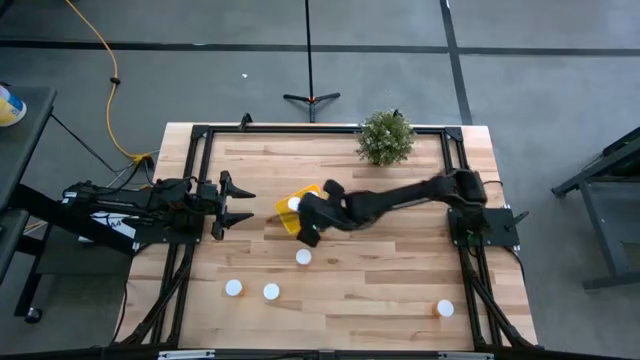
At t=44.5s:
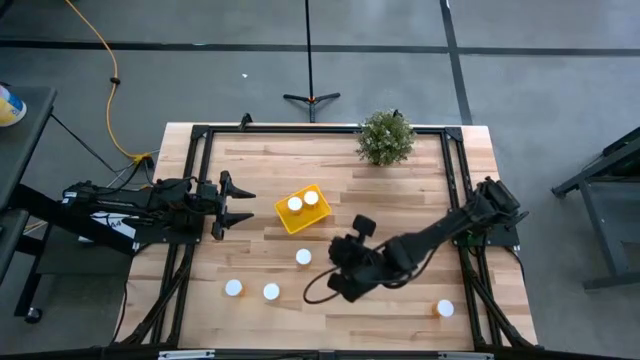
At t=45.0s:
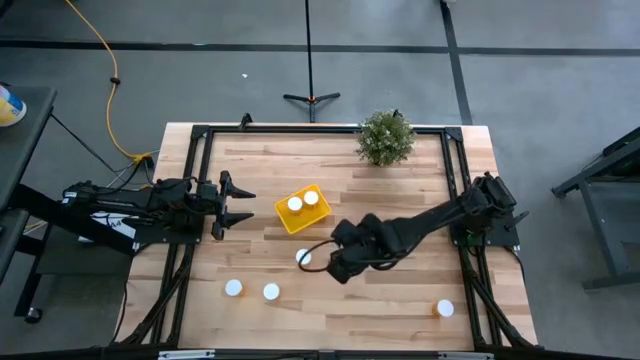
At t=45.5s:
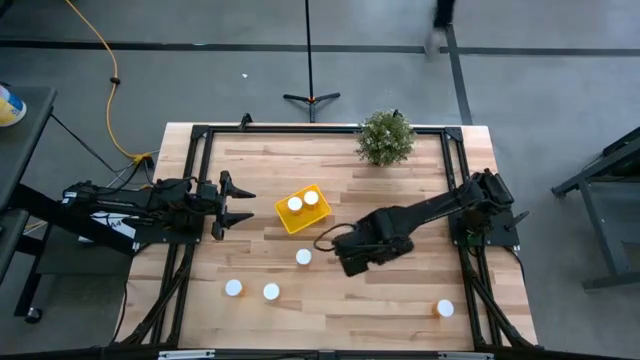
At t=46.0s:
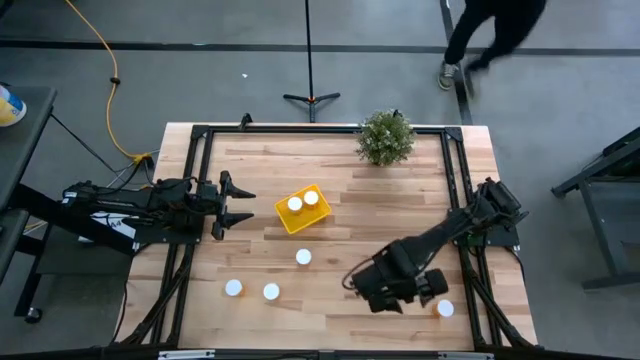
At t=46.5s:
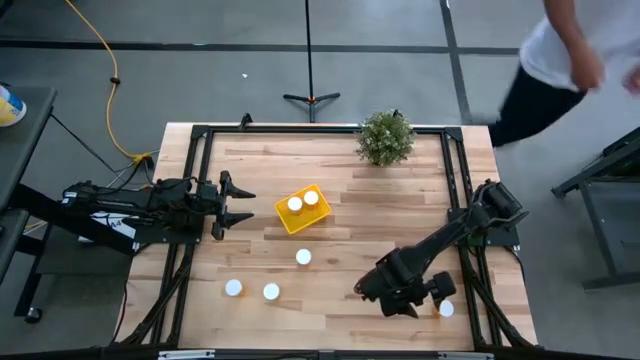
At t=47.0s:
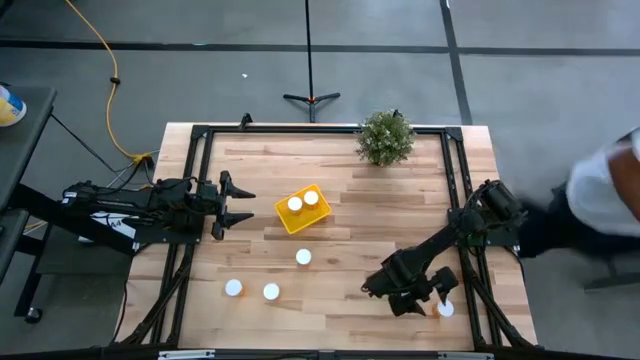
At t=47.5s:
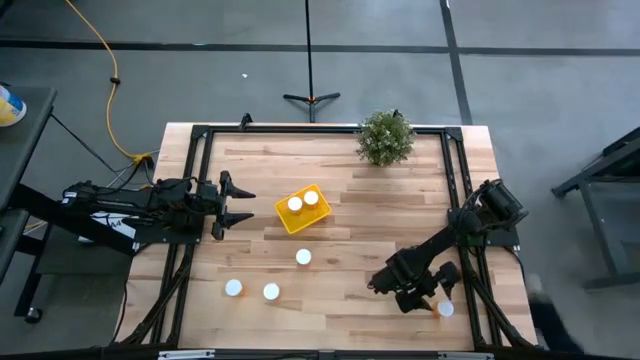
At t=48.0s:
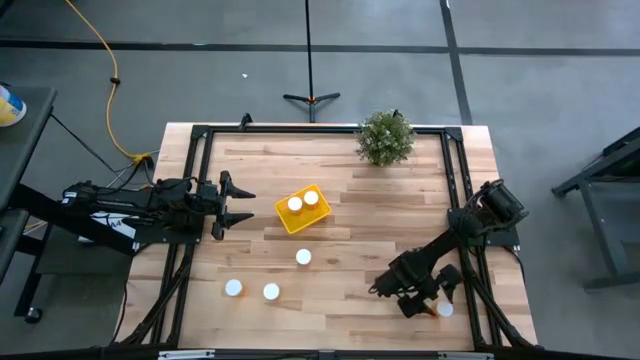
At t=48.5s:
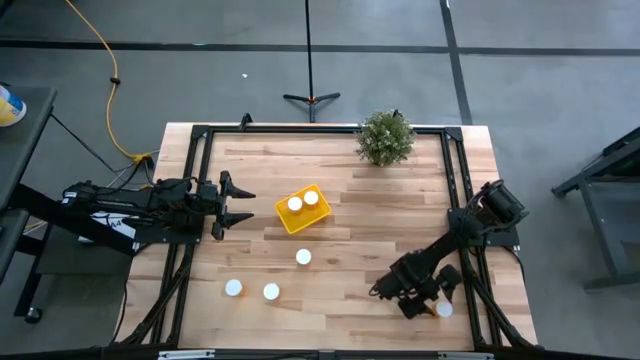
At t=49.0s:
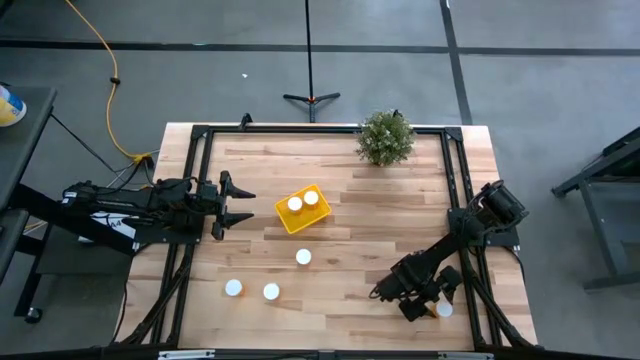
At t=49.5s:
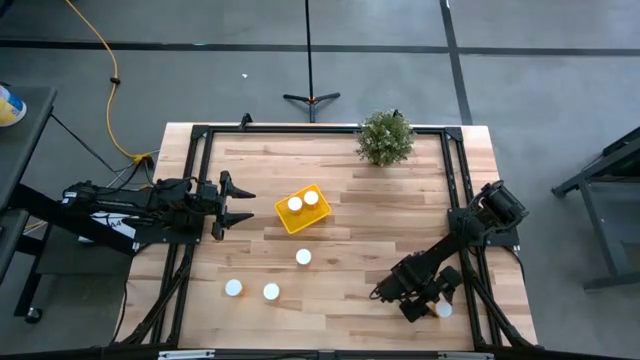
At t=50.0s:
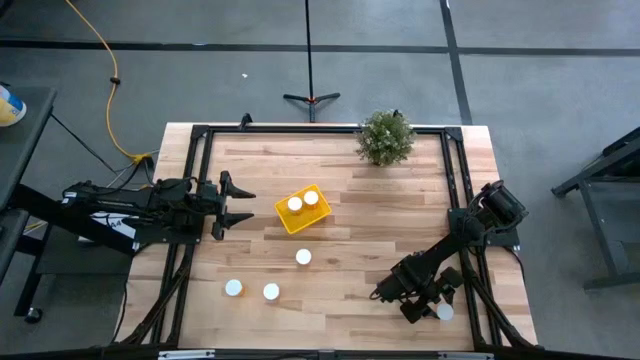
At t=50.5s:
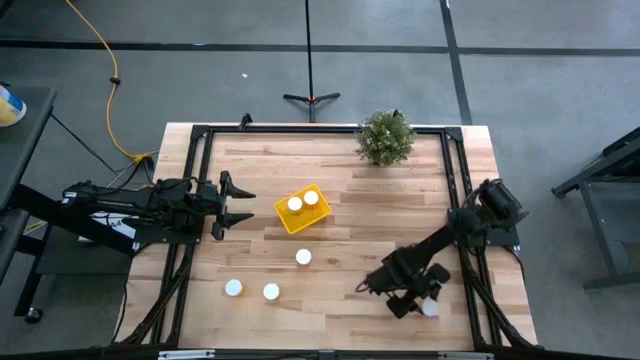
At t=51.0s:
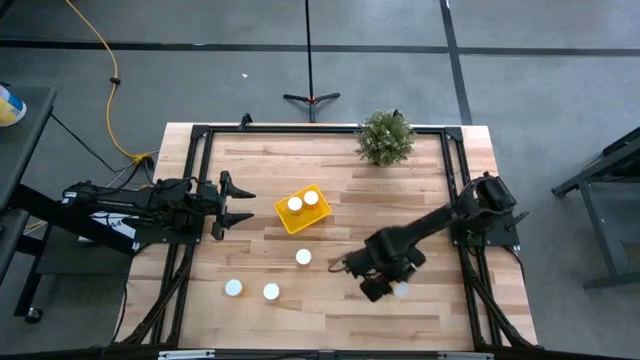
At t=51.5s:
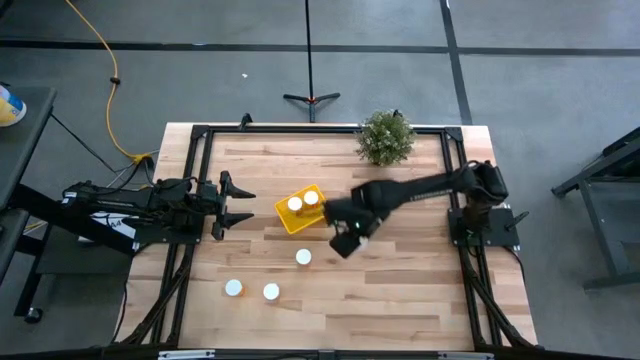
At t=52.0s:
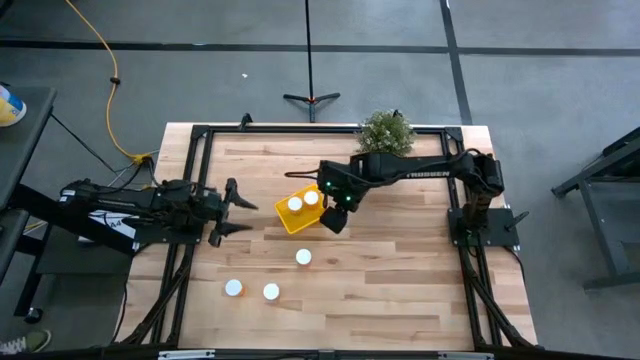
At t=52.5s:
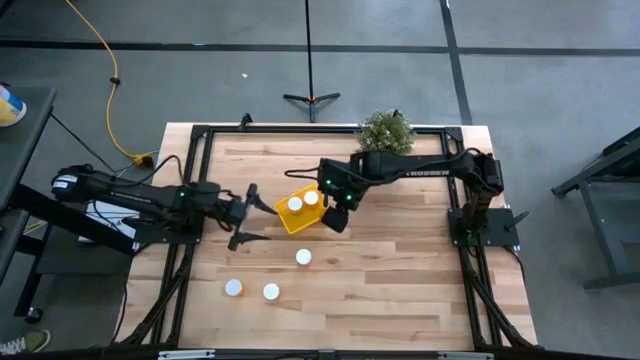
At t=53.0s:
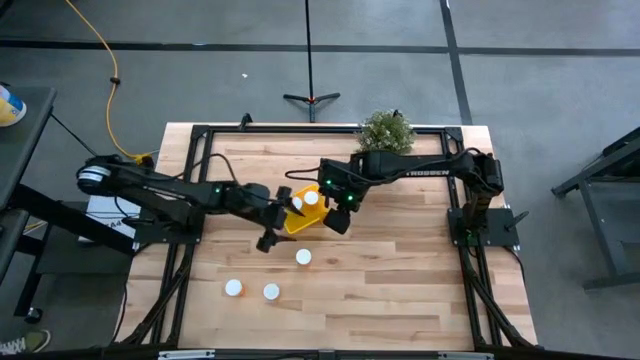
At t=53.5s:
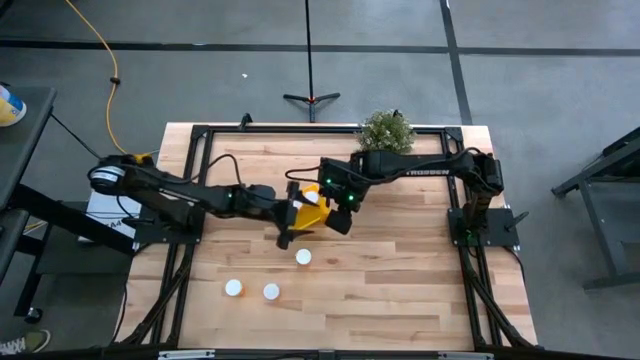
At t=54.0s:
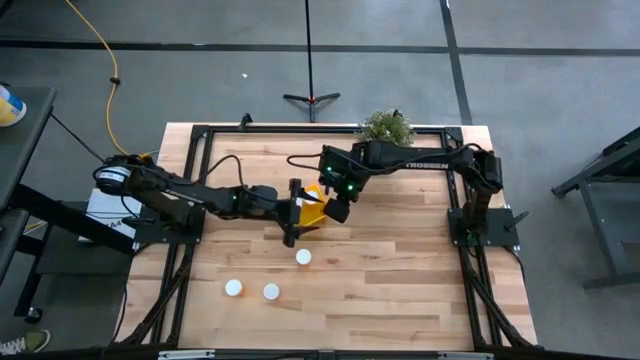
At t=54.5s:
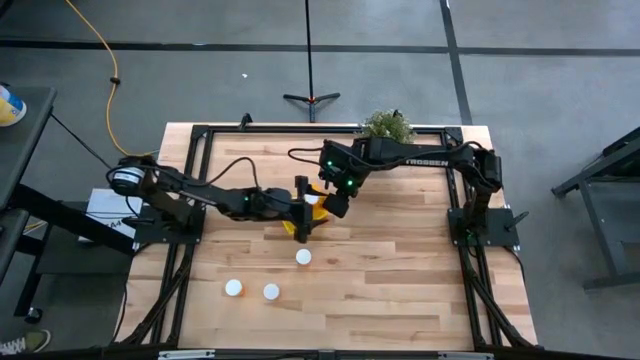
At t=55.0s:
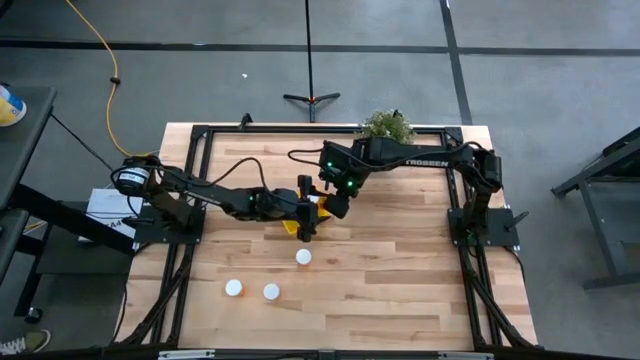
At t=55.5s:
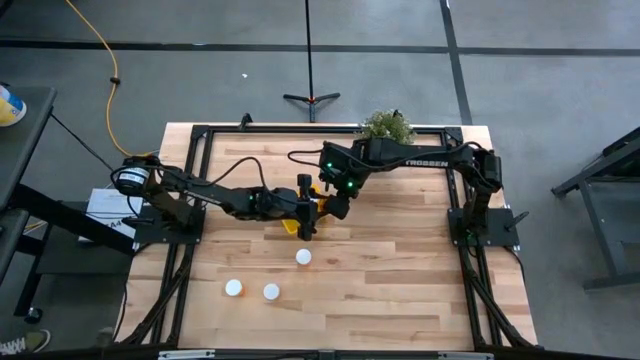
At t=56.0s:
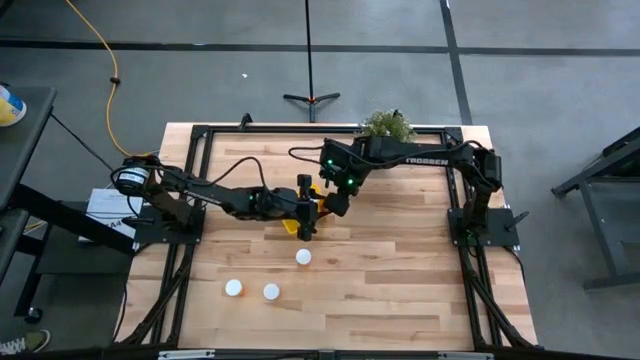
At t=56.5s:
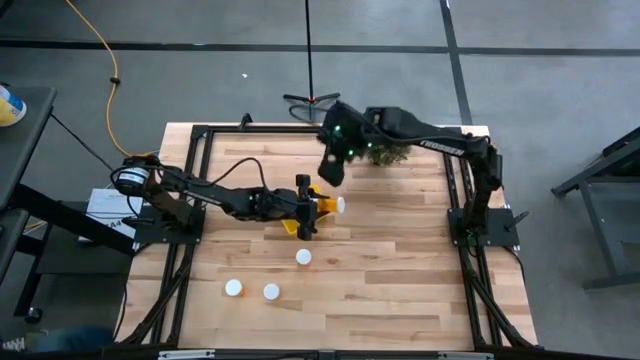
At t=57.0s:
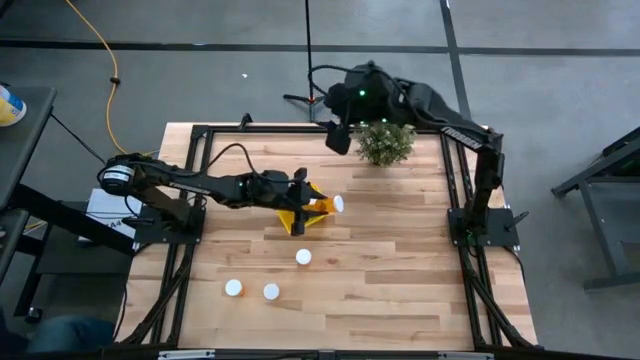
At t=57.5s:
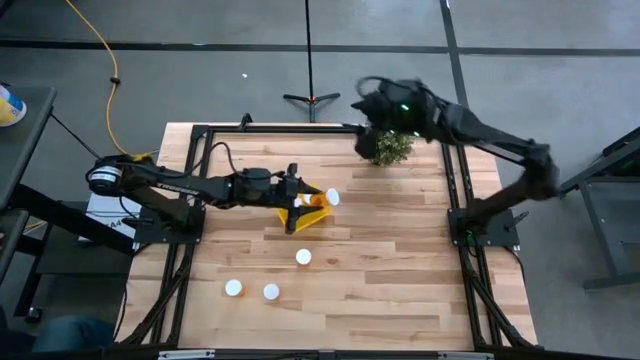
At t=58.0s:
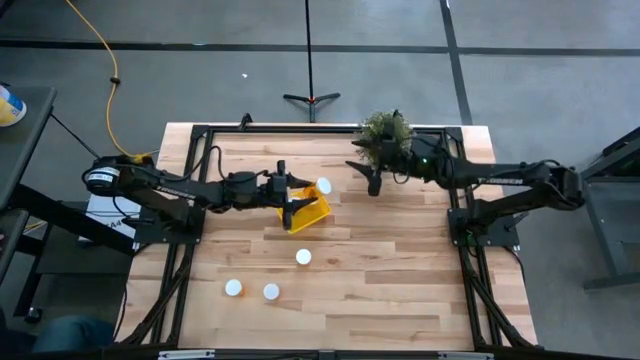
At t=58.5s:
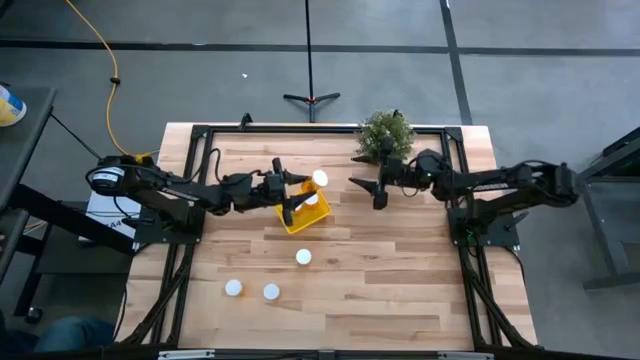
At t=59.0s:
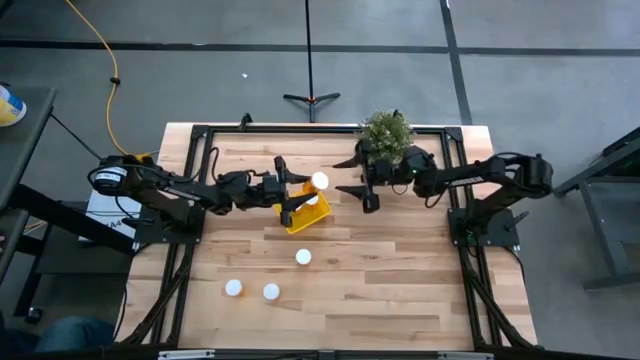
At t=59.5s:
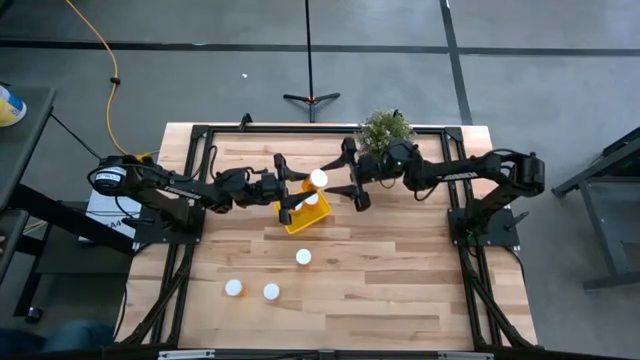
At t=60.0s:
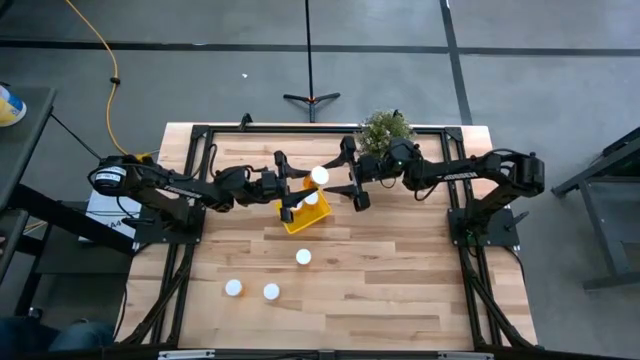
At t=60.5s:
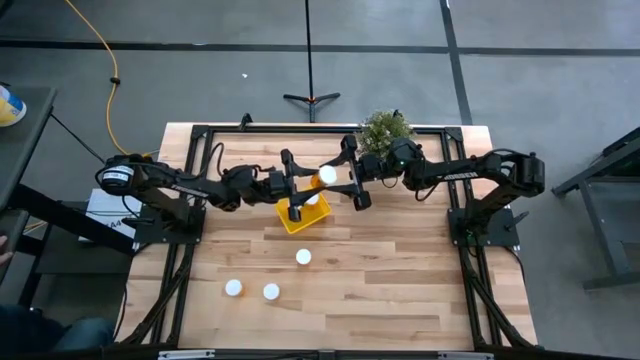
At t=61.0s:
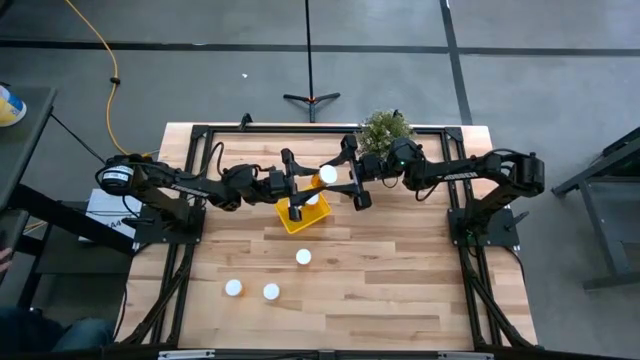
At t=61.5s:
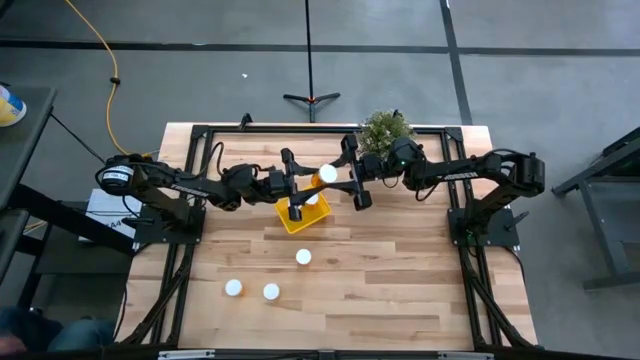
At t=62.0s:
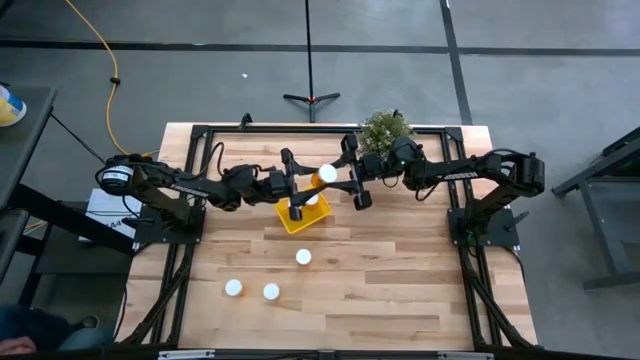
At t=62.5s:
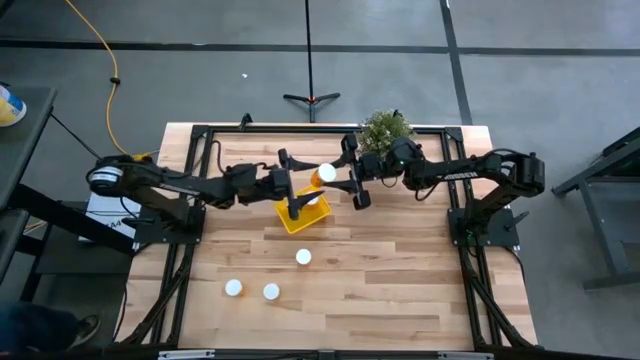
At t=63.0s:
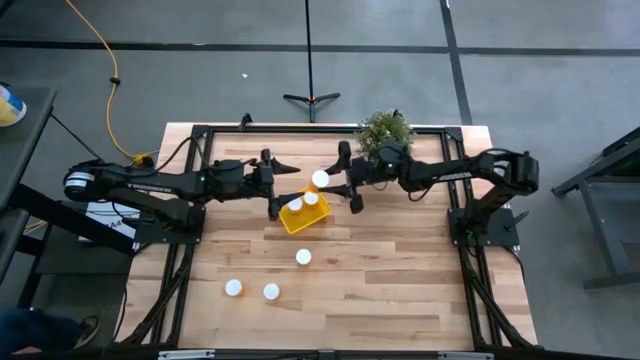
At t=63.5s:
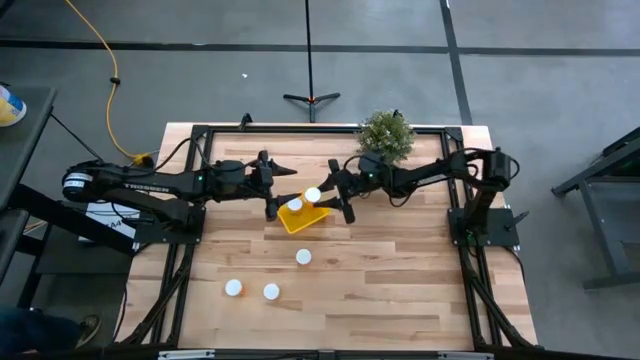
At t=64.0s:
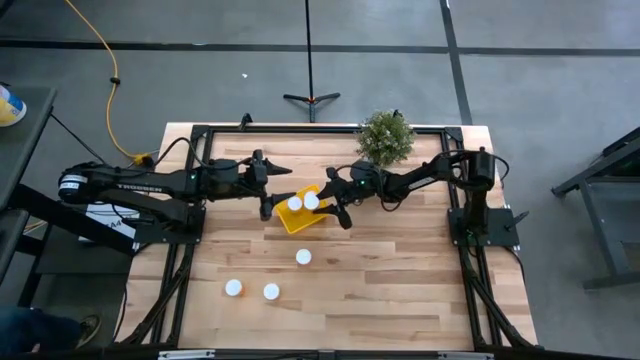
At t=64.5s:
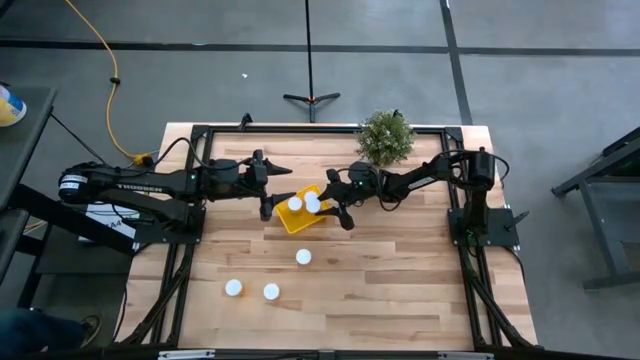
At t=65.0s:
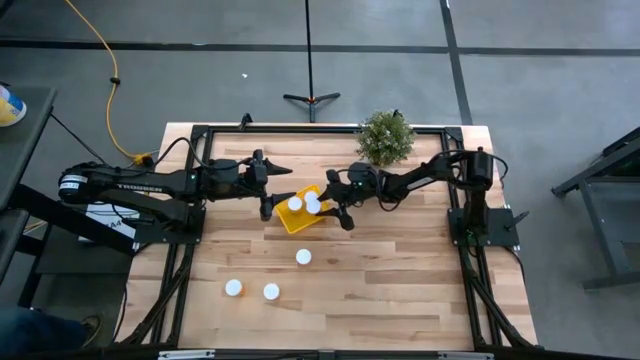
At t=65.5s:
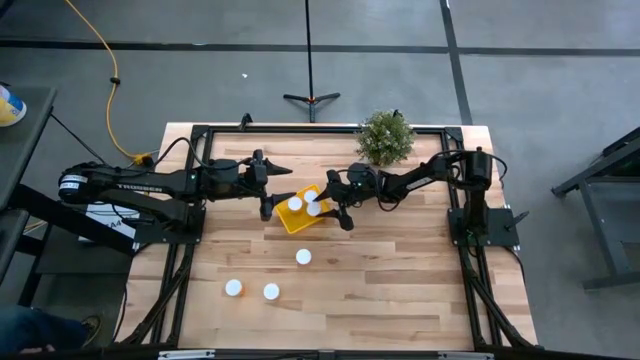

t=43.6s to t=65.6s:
Task: Pick and place pill bottles into a basket
Put the yellow pill bottle into the bin
